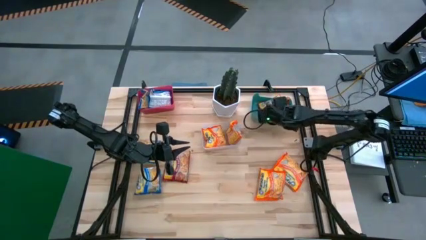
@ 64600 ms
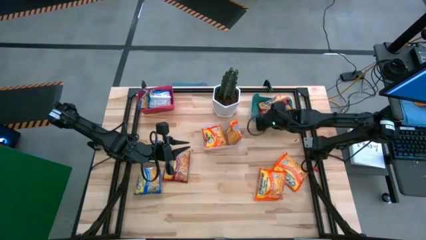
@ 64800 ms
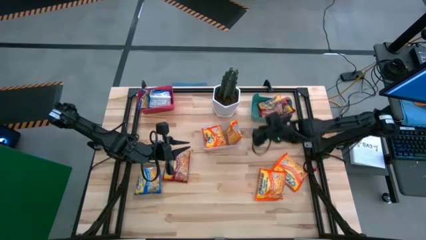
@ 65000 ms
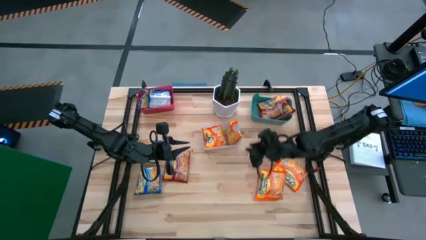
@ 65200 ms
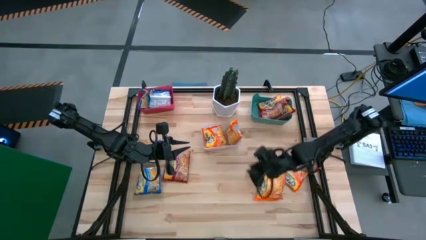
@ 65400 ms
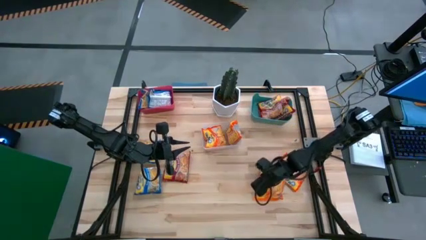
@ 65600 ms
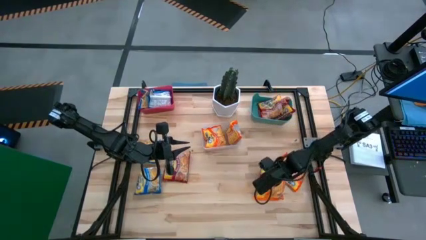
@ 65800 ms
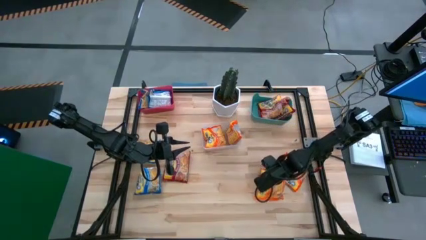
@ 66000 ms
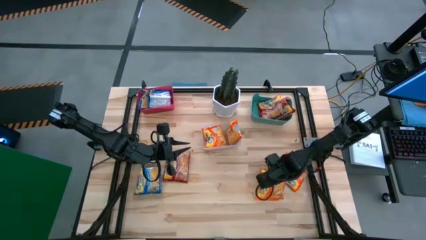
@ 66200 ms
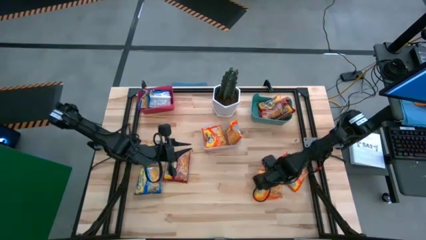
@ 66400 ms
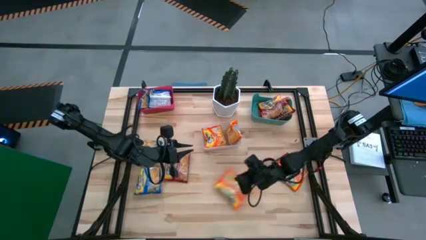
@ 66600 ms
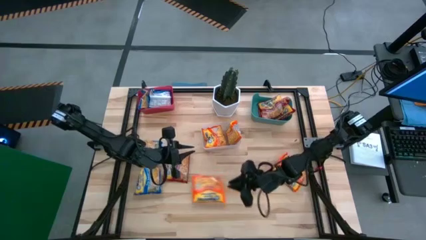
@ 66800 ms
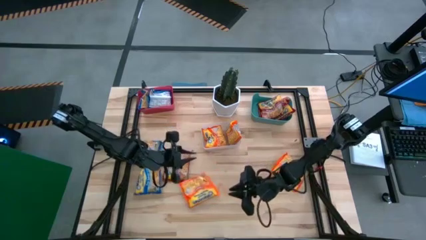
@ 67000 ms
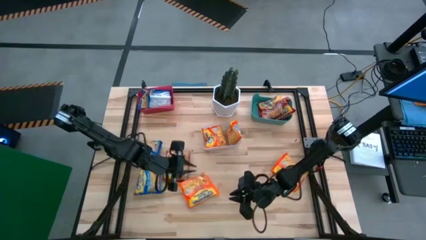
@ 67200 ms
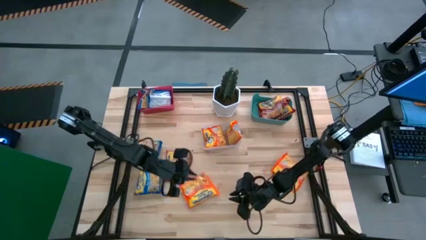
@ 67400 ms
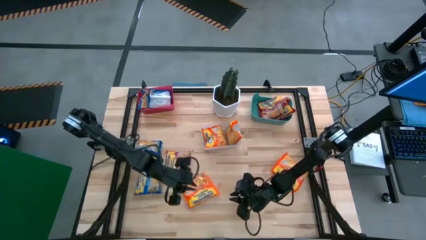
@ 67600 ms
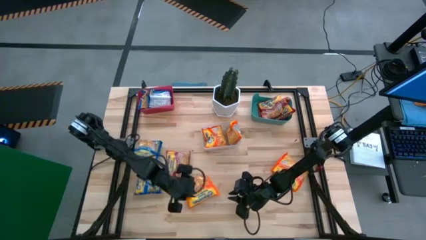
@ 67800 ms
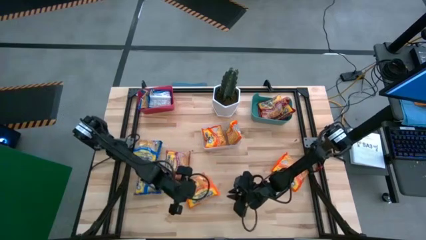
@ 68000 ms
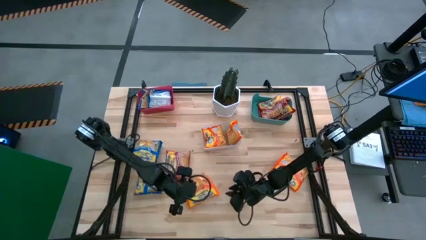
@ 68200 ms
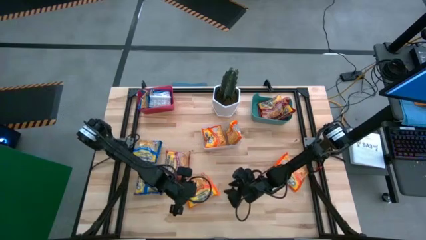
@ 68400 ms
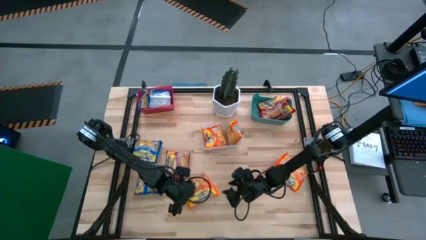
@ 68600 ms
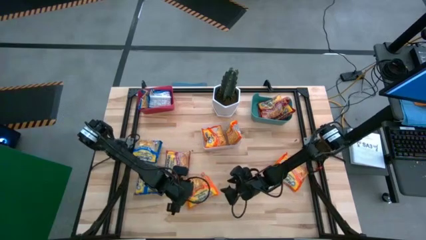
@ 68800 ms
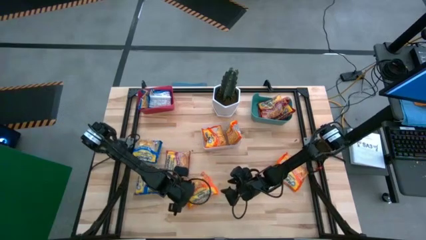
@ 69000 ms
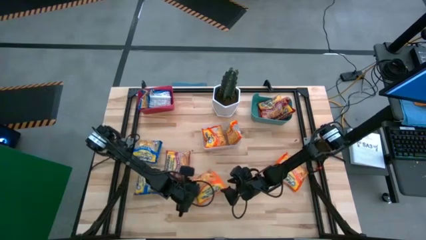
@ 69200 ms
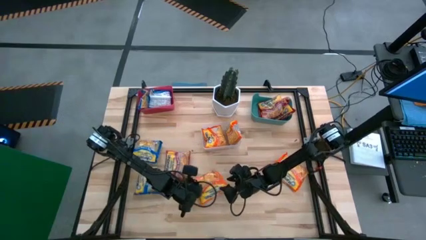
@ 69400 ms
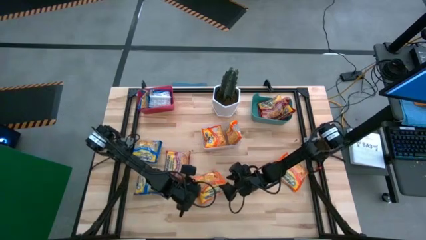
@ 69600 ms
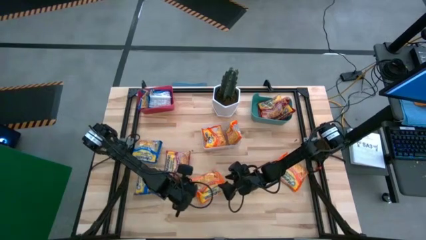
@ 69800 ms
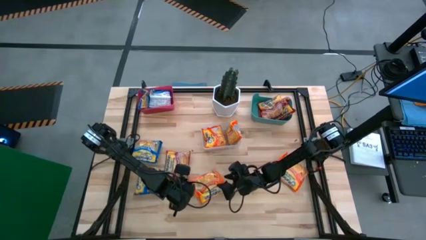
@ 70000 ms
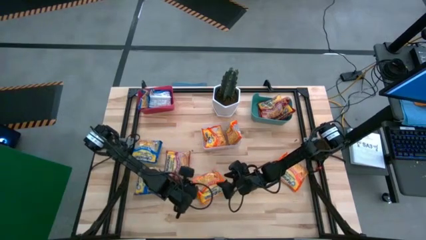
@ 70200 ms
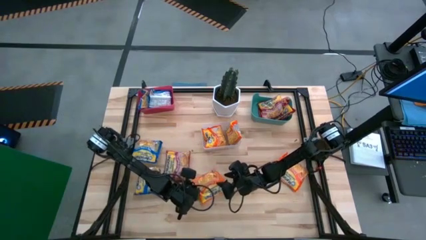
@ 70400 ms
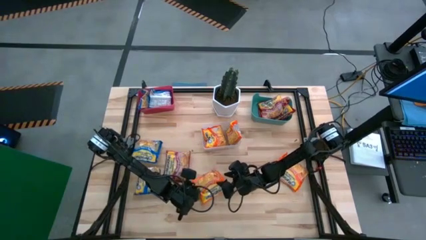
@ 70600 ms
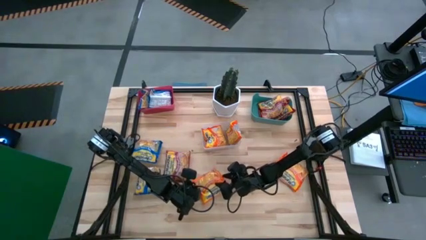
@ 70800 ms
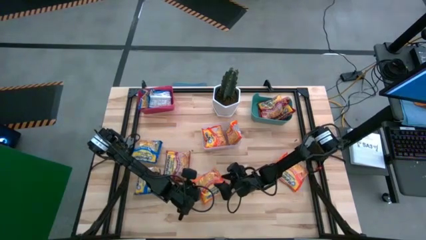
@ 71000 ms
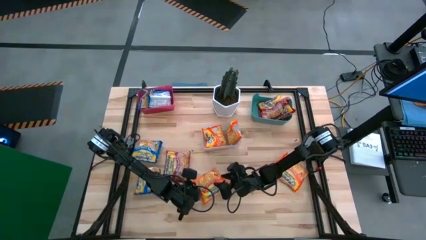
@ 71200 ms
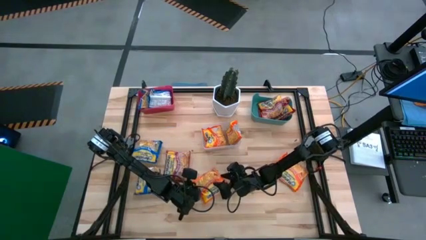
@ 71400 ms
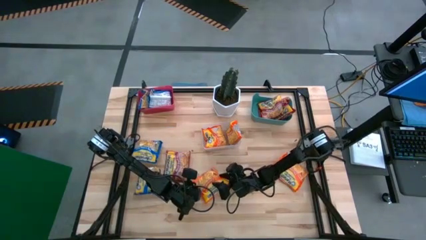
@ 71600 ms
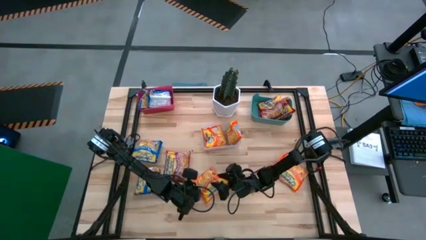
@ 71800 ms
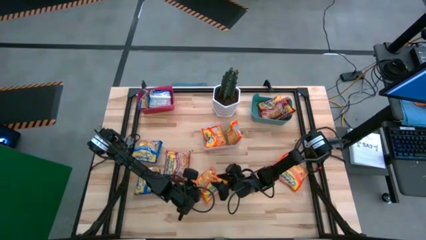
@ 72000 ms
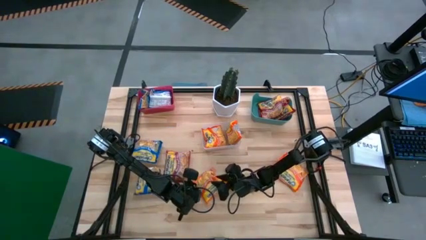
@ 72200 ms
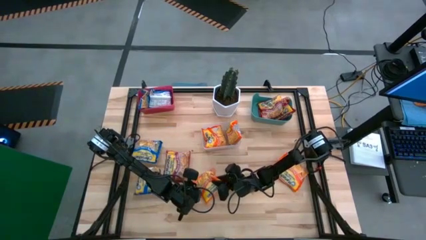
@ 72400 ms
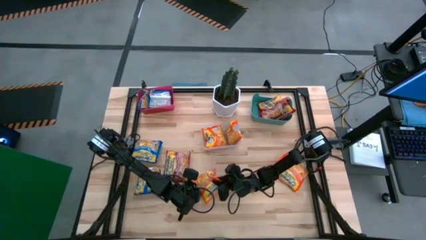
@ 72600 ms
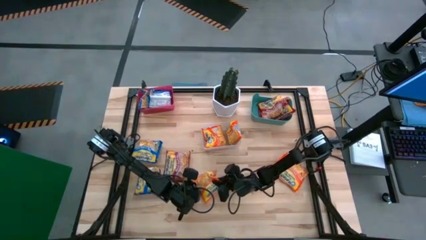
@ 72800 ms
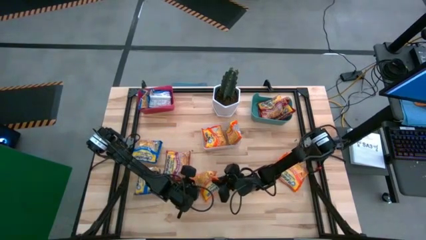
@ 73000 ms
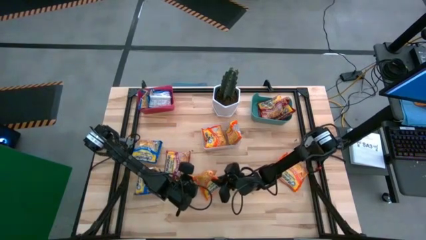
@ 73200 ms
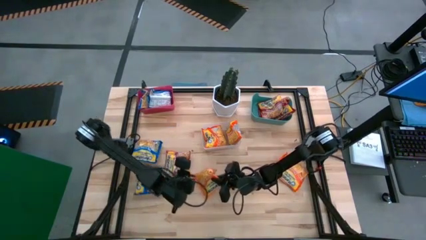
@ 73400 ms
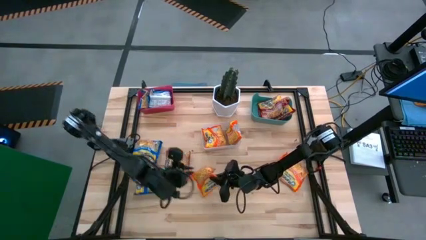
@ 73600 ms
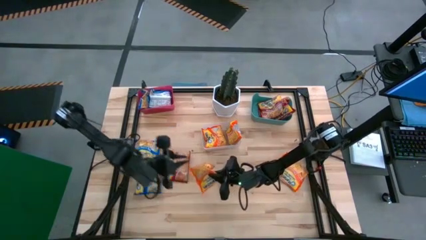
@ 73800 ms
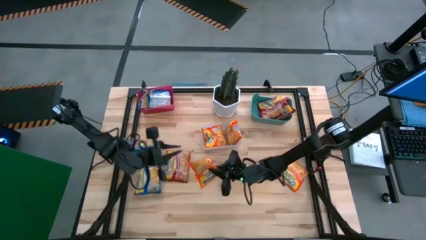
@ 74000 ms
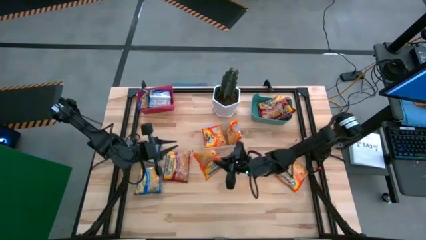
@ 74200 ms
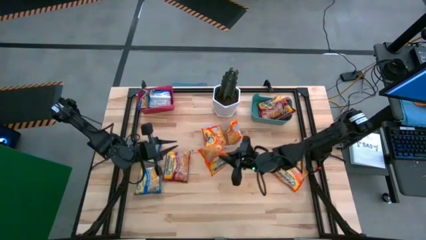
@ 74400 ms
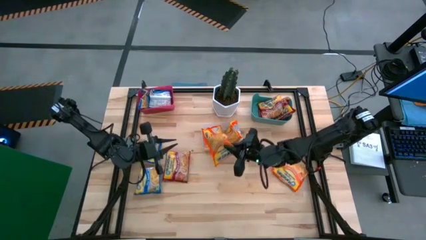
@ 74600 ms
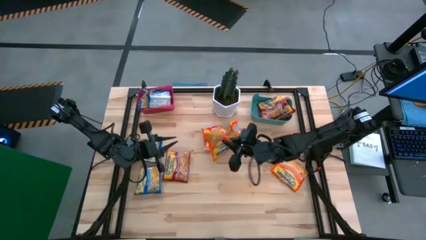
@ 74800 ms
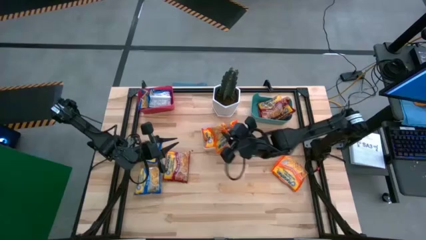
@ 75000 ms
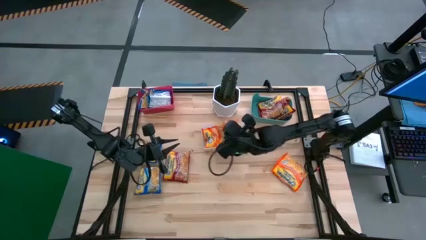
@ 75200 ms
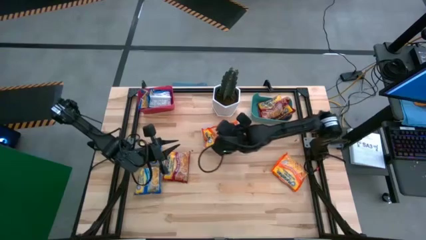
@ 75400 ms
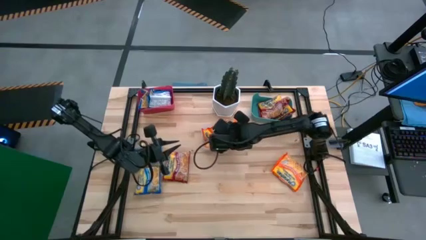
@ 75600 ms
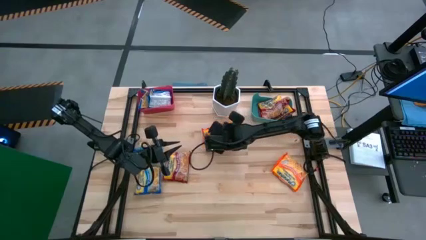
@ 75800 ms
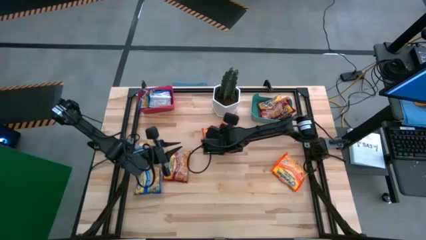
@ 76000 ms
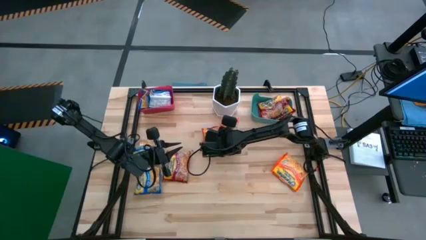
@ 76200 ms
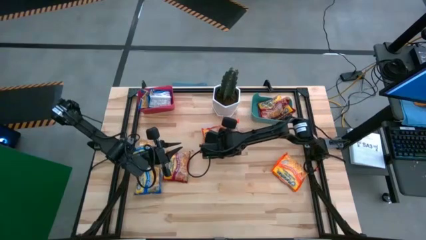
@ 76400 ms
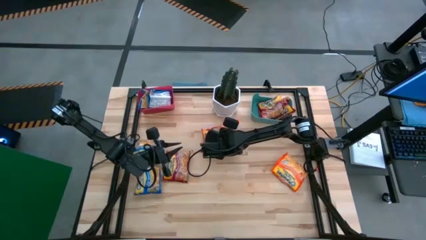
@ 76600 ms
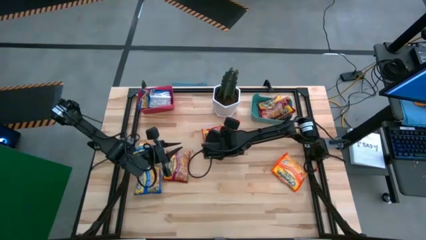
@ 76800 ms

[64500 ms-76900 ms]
Task: Sort Maruchan noodles
Put the orange noodle pack into the transparent bin

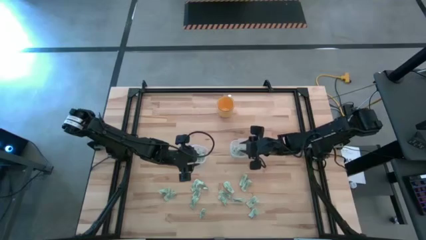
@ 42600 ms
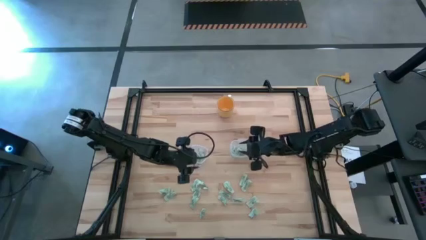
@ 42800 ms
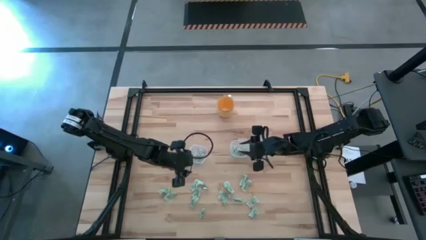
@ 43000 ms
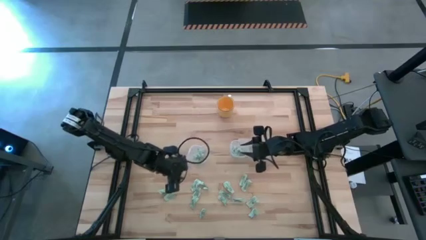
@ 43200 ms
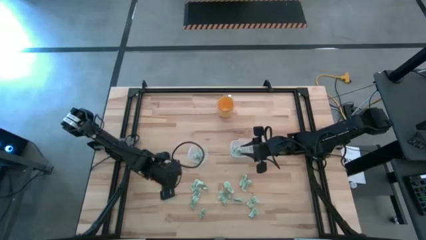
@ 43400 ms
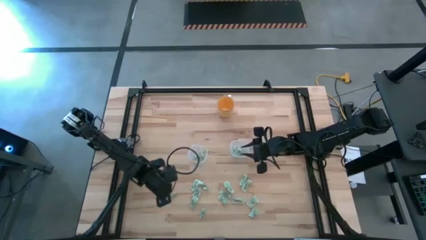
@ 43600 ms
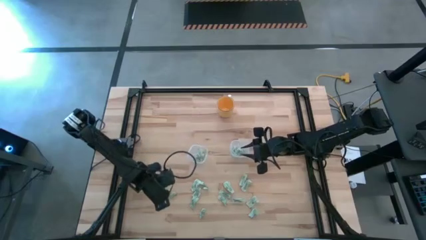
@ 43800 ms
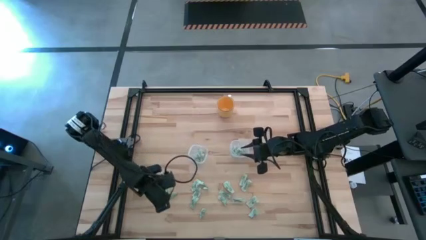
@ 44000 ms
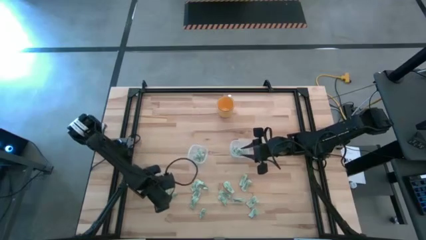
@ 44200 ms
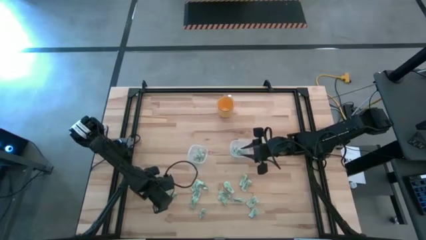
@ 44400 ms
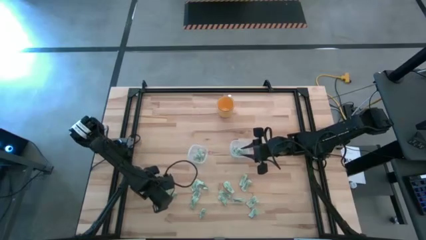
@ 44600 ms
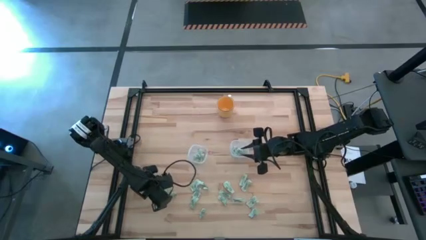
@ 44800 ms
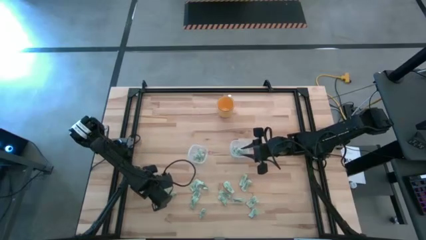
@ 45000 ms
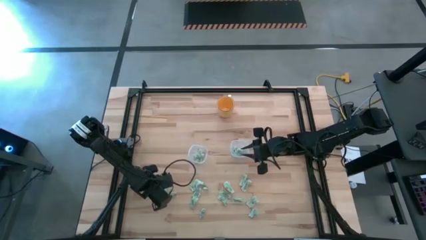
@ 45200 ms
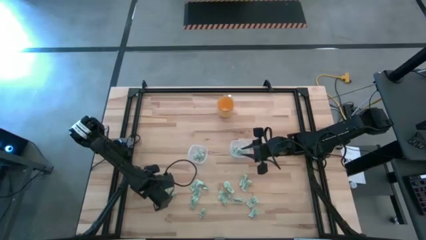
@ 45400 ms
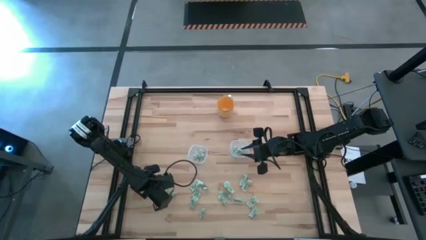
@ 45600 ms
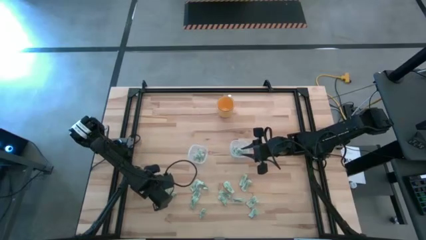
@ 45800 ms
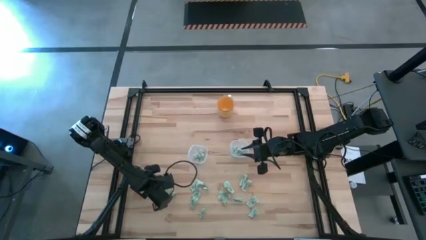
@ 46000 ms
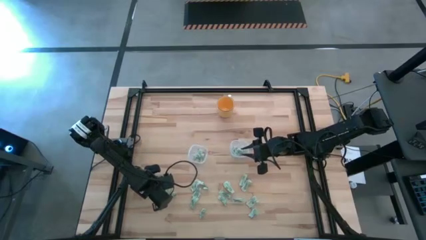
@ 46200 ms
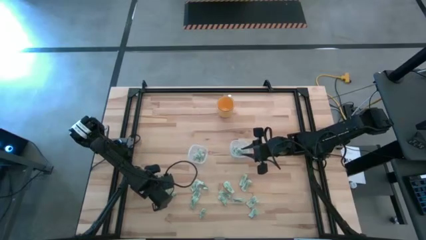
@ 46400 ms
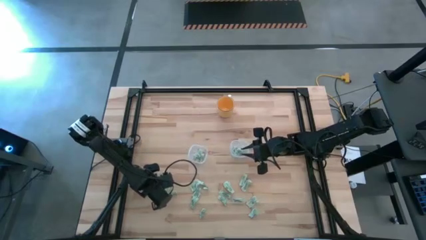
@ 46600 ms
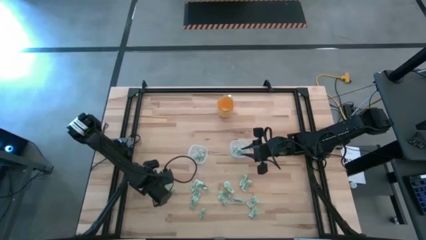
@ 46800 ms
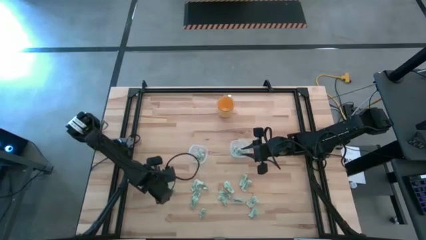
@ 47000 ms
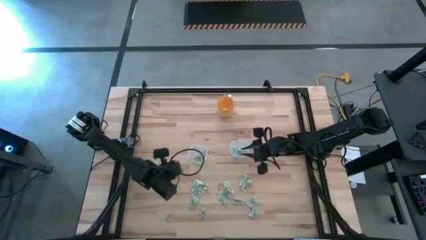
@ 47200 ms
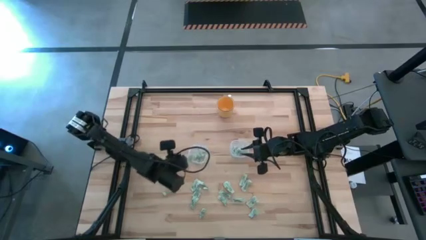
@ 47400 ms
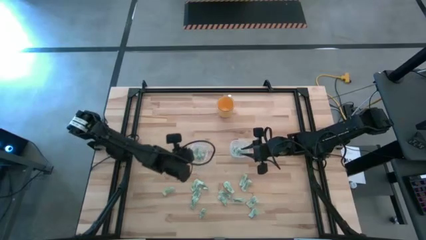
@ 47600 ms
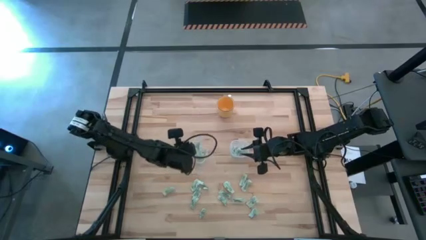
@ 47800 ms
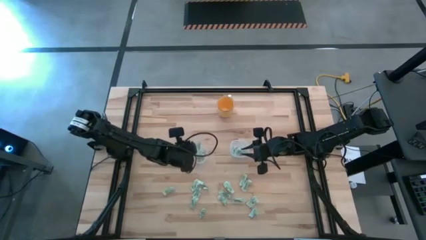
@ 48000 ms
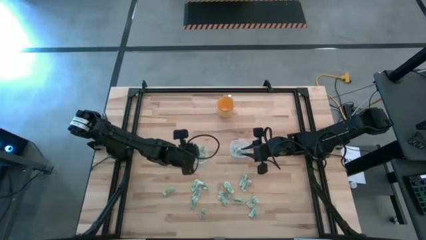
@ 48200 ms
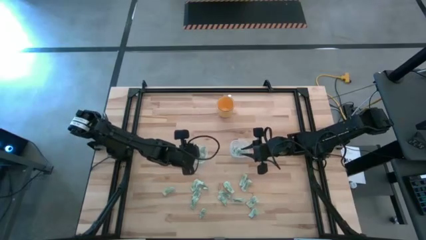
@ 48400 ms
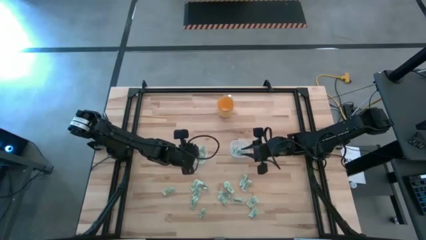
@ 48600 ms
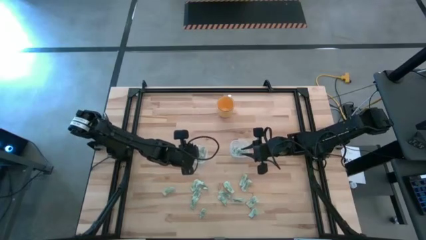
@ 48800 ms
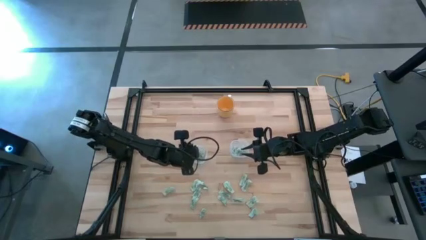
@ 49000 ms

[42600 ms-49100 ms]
Task: Pick and place items into bin
Put the green sweetener bag into the left transparent food container
